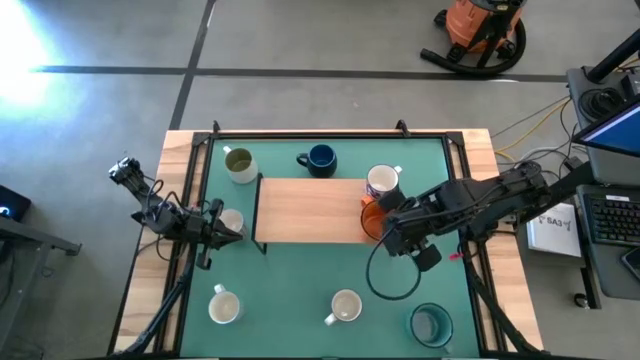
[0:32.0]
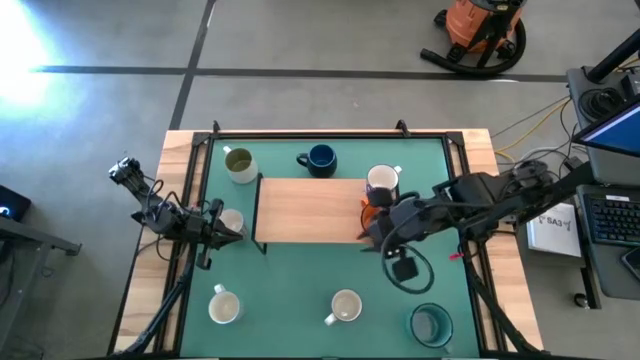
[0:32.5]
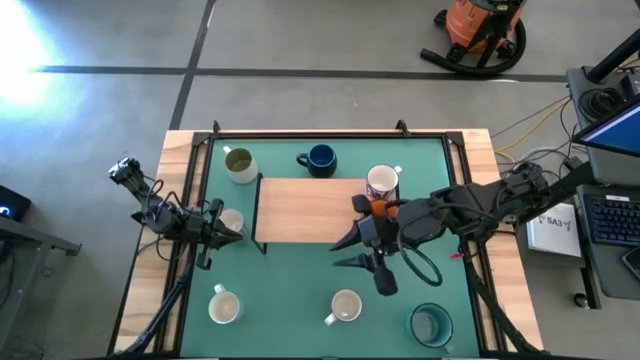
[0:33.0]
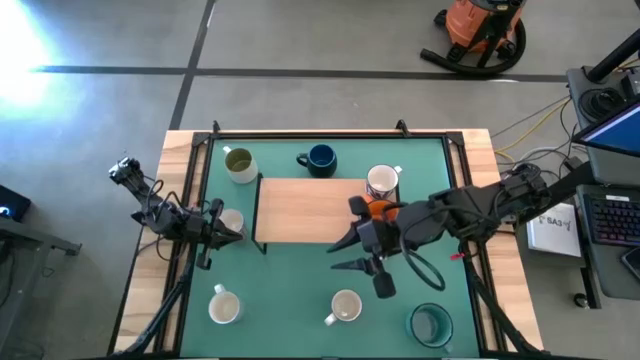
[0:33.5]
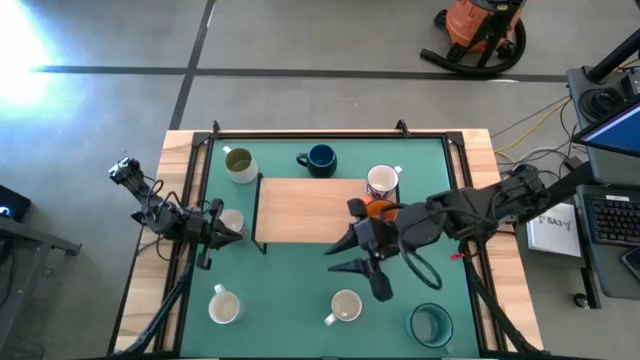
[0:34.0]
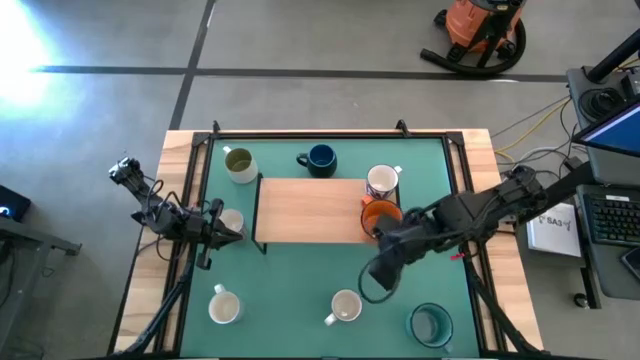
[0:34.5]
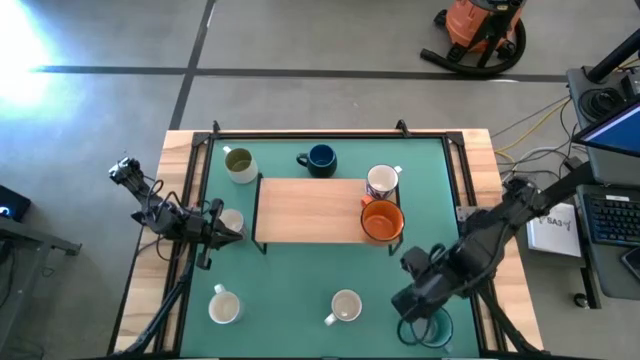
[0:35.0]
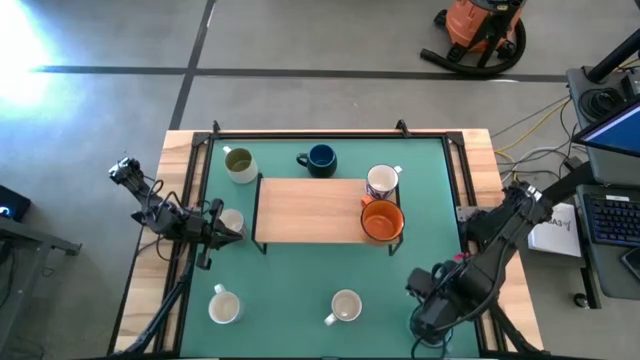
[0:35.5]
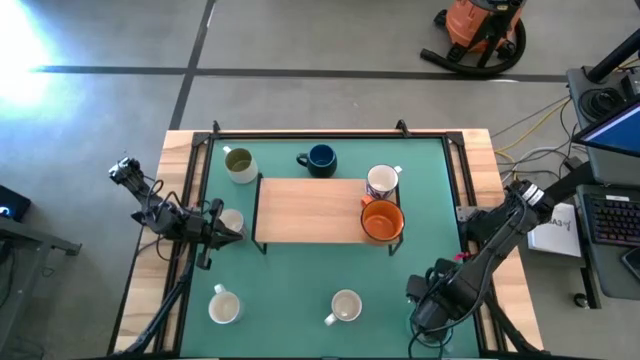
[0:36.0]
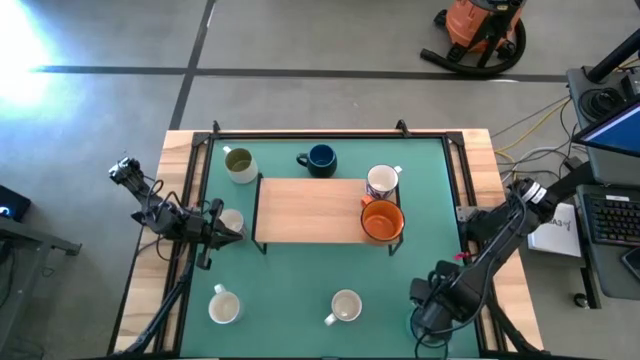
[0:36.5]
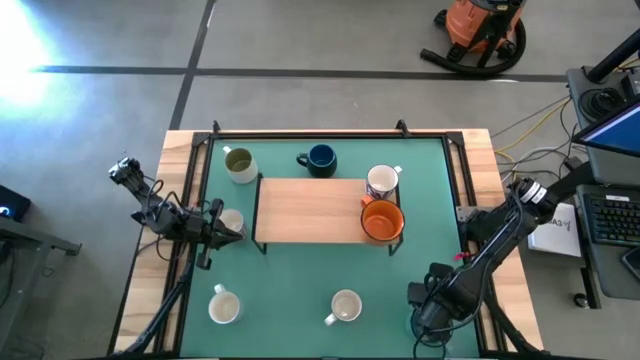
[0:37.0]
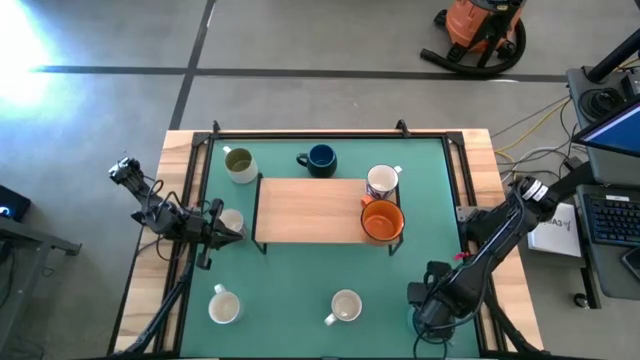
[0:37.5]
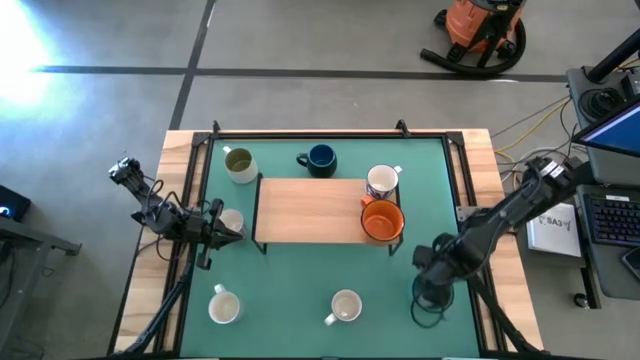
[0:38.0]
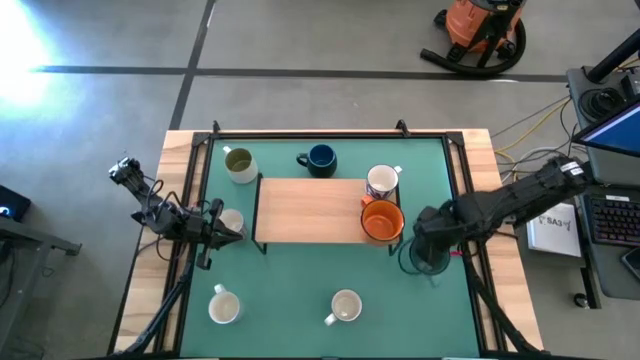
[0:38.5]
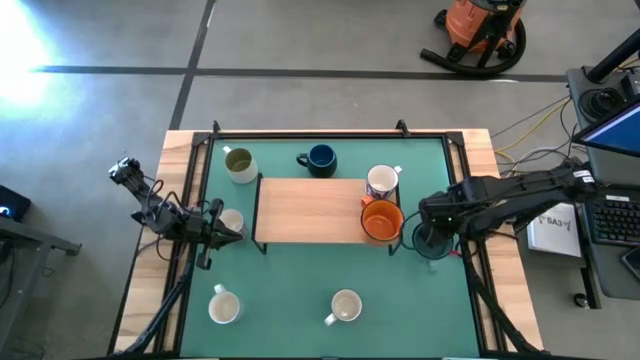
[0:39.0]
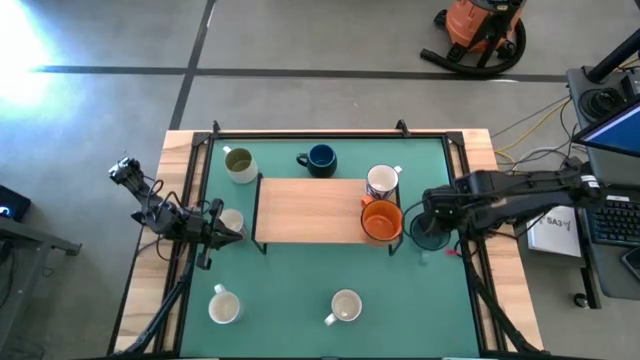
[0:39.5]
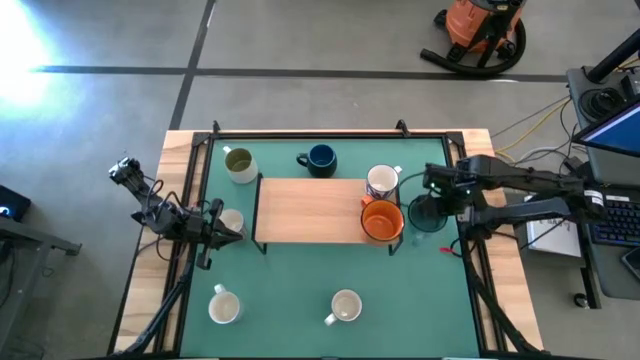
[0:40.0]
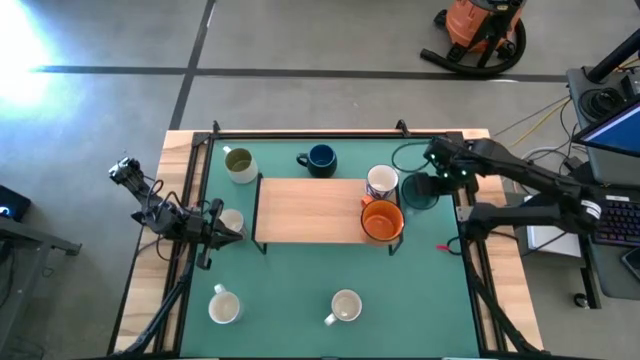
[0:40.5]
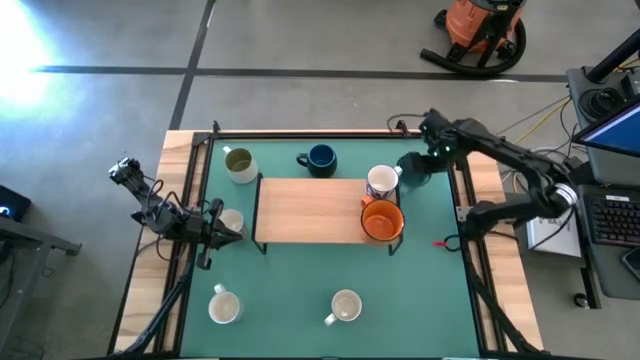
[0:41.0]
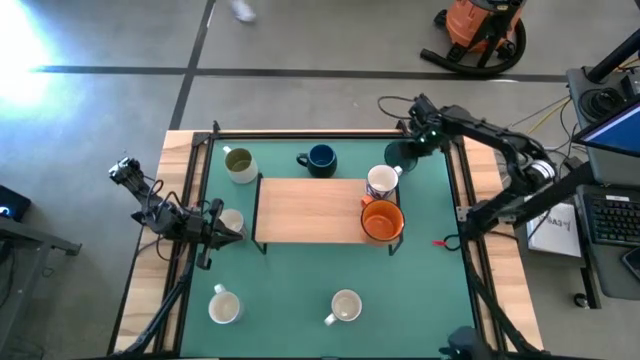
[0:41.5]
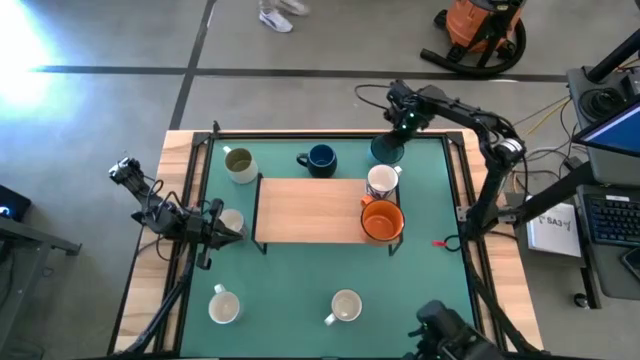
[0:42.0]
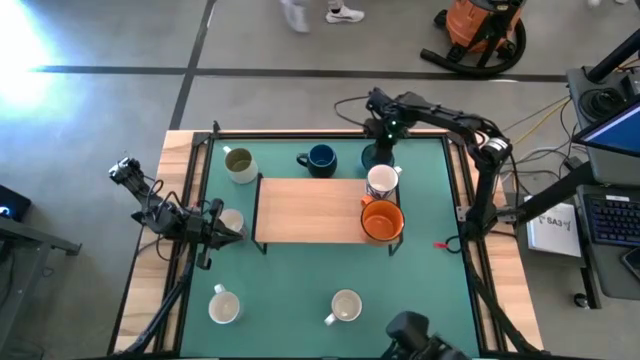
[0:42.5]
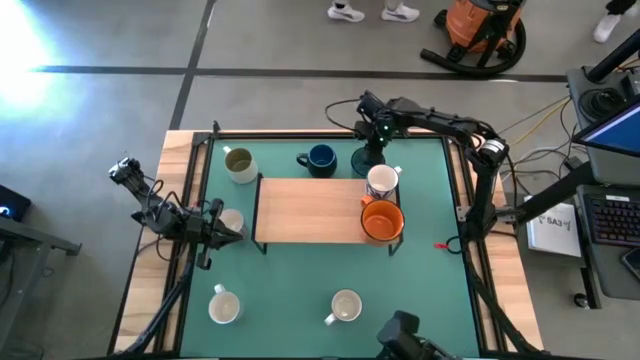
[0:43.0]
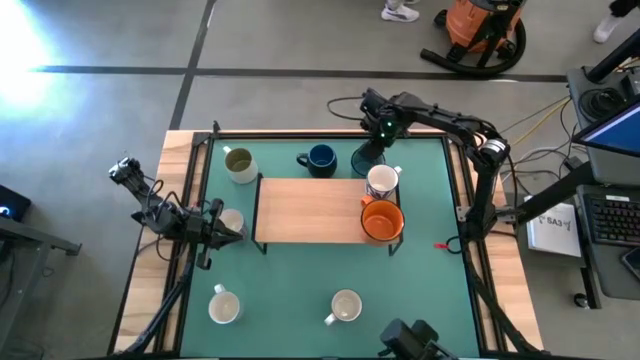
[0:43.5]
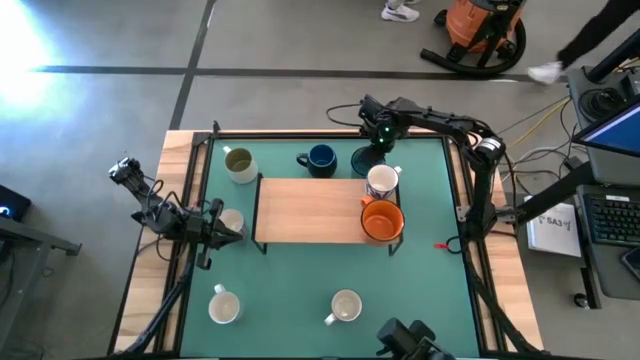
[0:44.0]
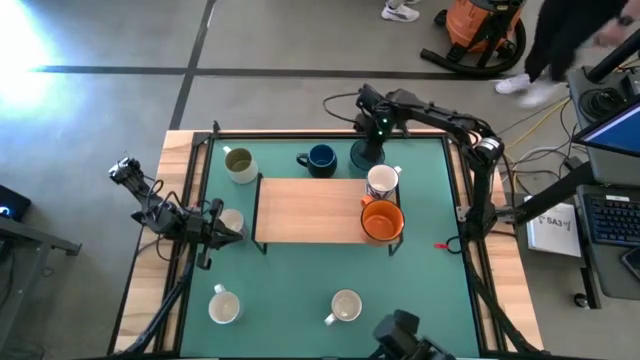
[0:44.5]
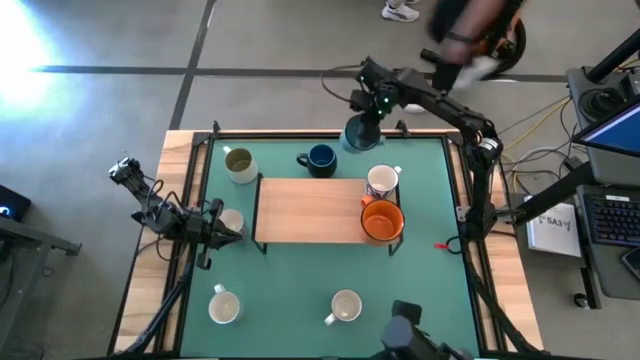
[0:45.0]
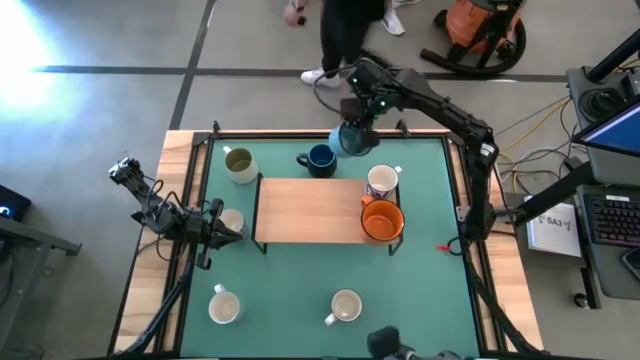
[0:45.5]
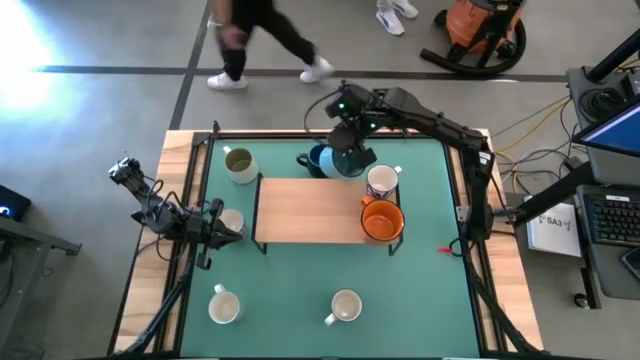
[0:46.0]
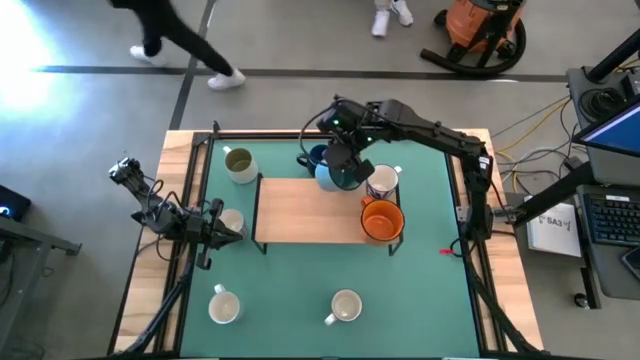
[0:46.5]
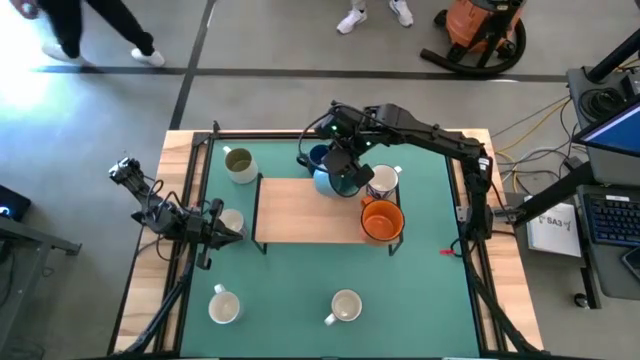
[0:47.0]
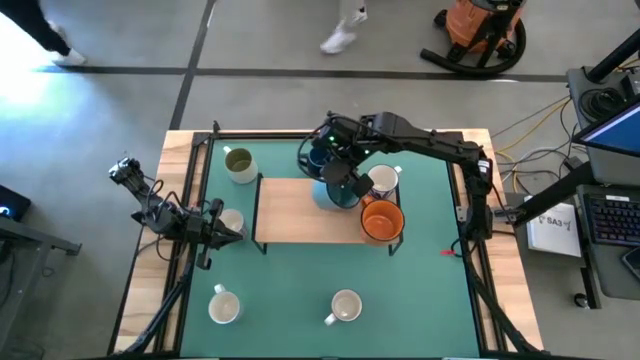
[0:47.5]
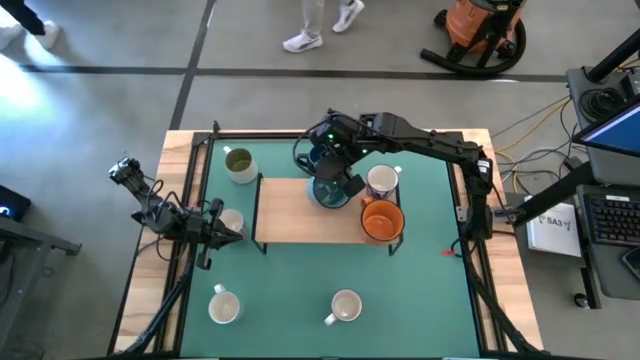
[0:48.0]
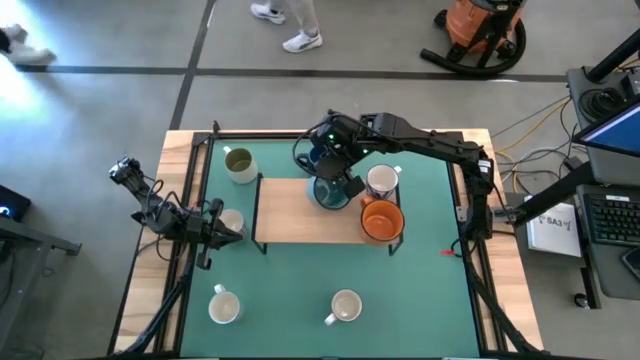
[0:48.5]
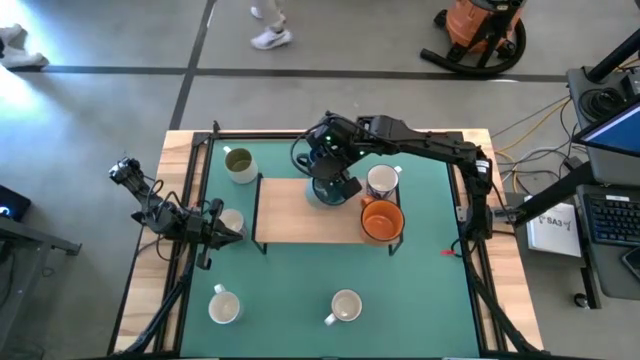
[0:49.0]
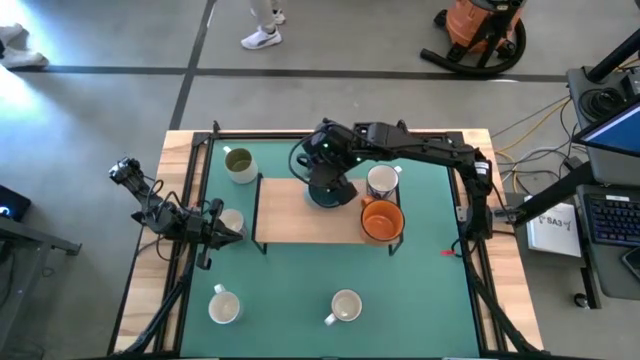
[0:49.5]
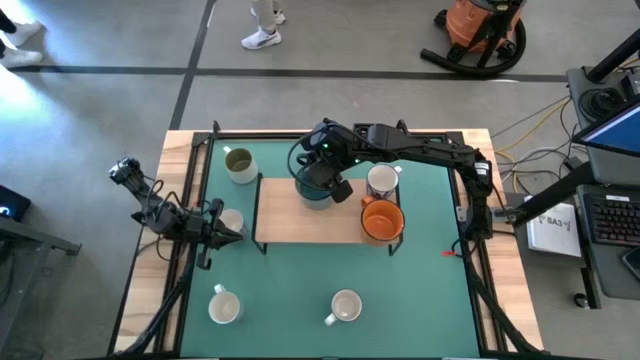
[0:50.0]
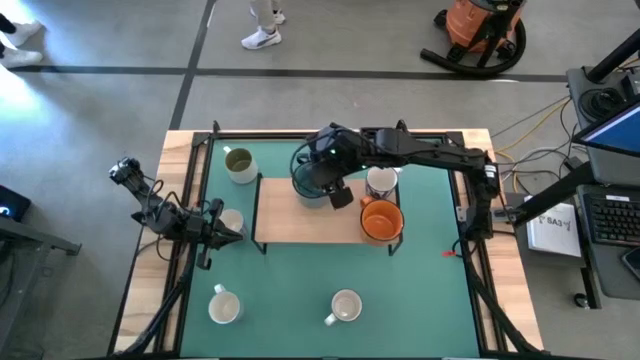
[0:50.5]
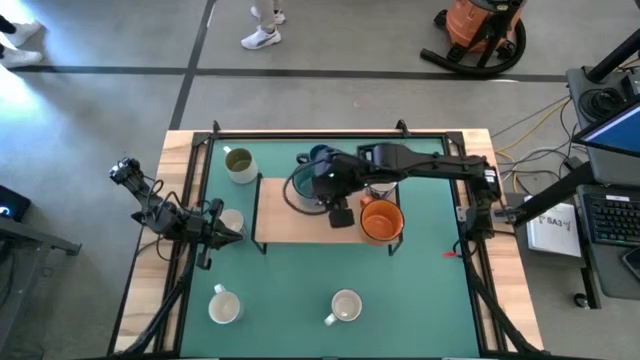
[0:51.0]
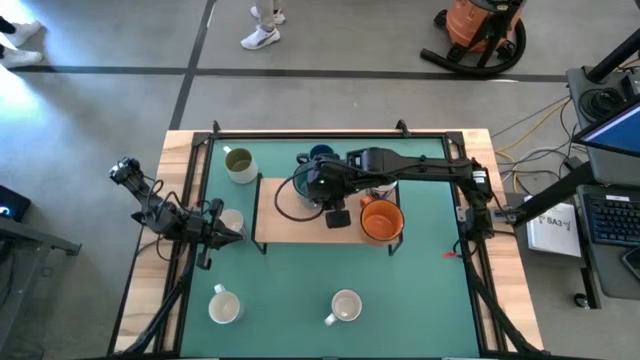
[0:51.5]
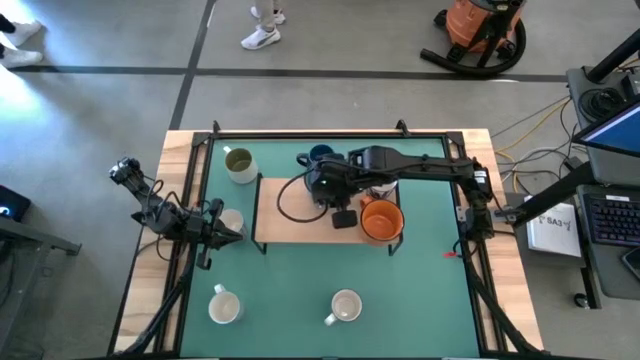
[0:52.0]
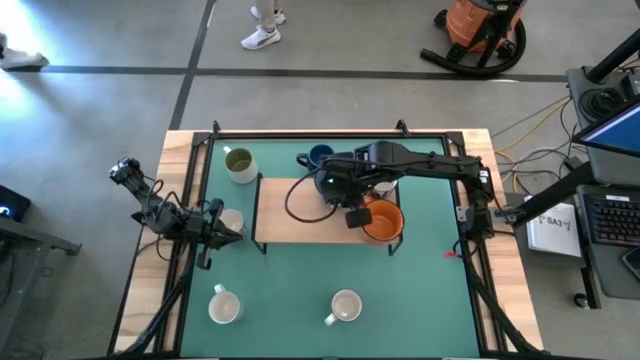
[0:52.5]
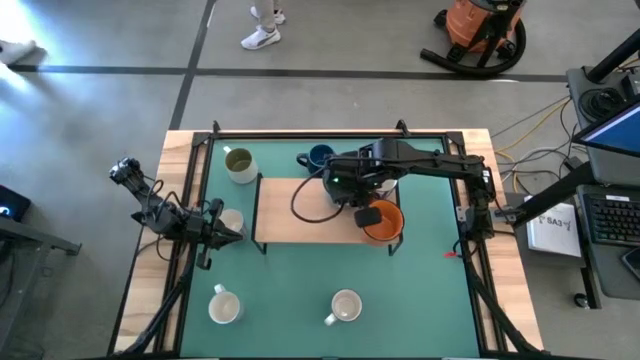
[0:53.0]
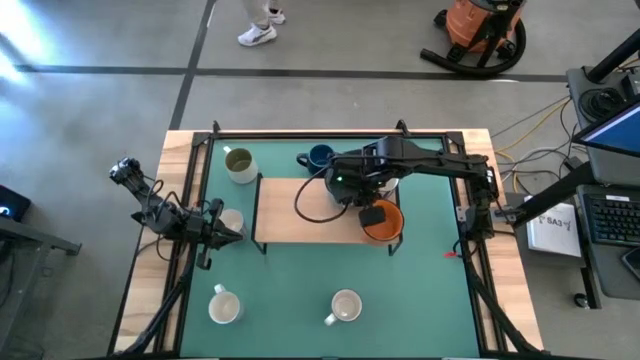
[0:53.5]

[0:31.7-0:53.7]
Task: Place coffee mugs
Put the blue mug on the shelf
